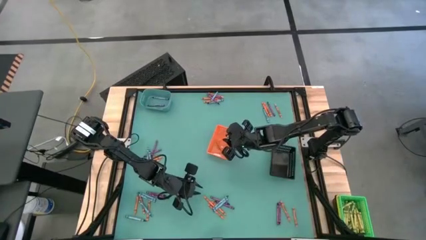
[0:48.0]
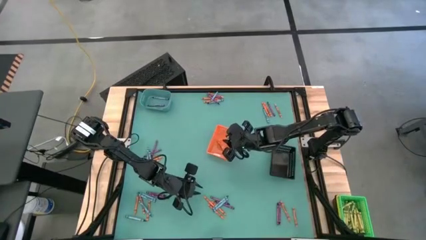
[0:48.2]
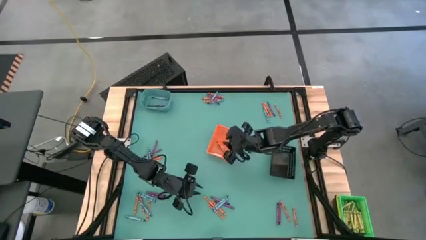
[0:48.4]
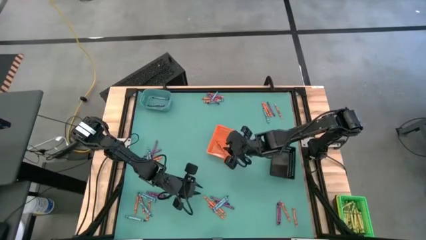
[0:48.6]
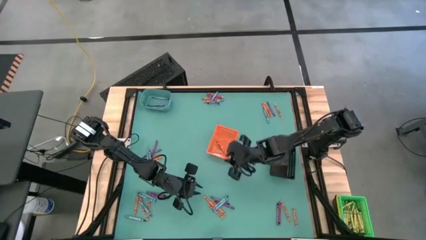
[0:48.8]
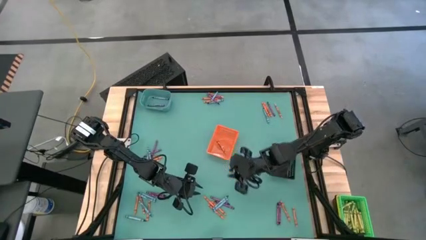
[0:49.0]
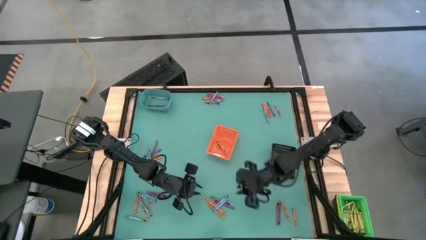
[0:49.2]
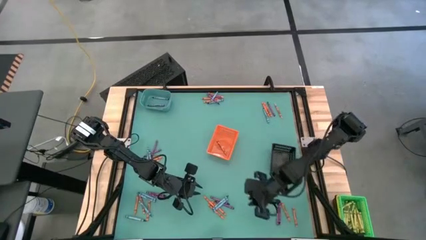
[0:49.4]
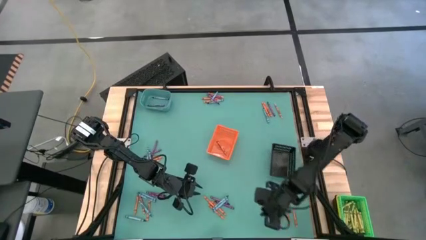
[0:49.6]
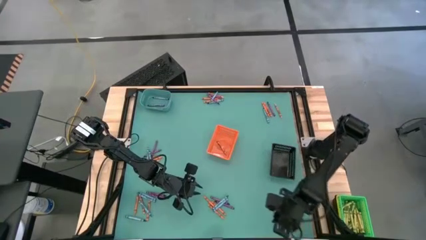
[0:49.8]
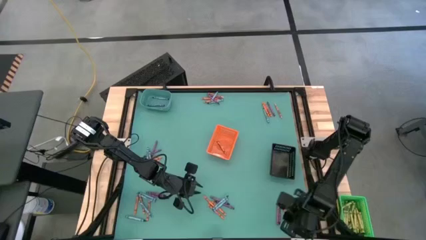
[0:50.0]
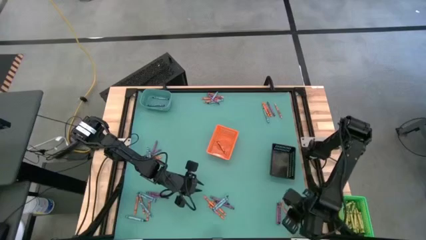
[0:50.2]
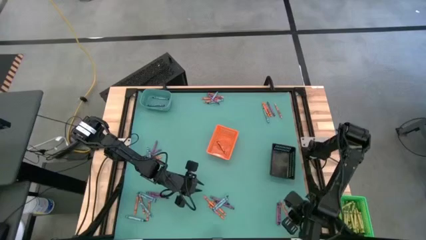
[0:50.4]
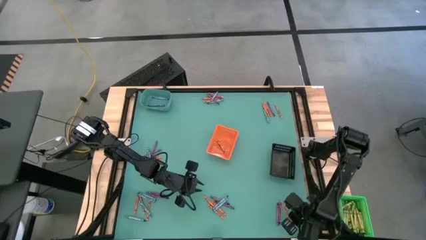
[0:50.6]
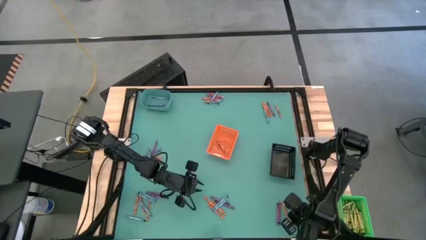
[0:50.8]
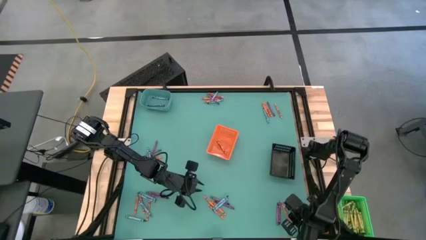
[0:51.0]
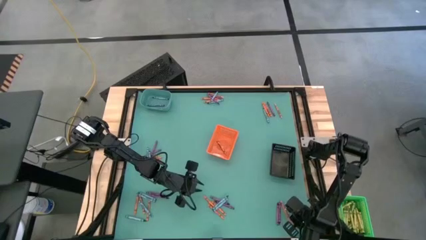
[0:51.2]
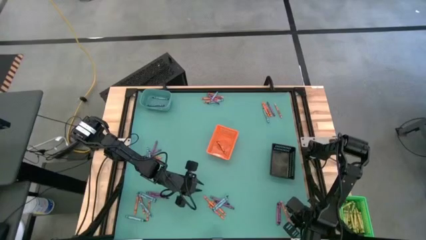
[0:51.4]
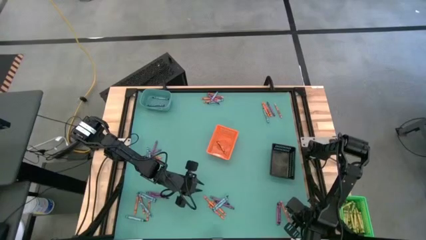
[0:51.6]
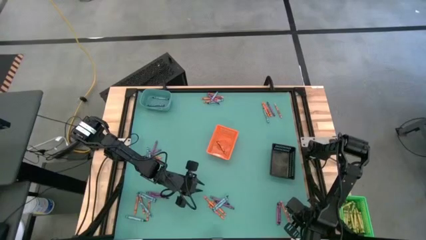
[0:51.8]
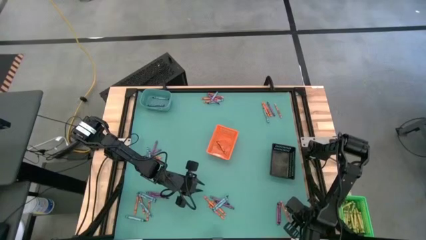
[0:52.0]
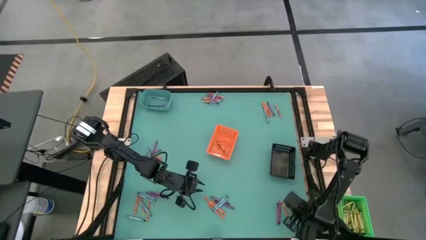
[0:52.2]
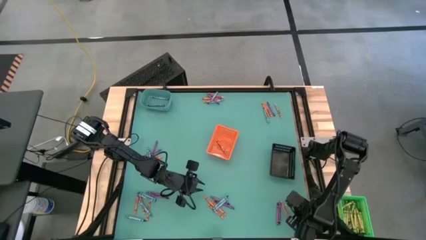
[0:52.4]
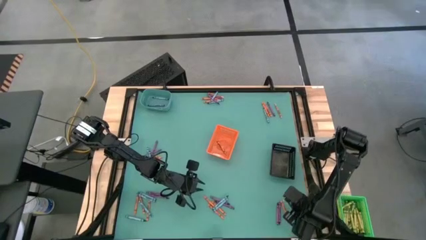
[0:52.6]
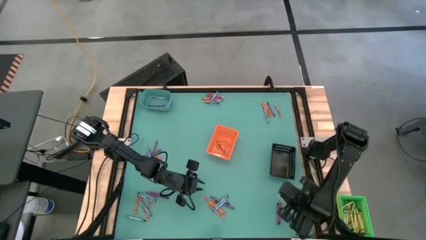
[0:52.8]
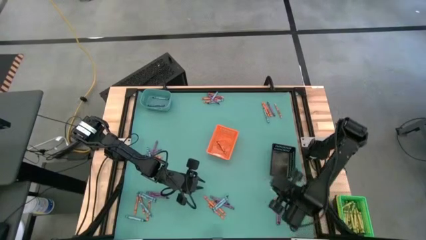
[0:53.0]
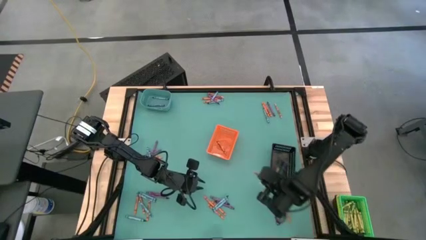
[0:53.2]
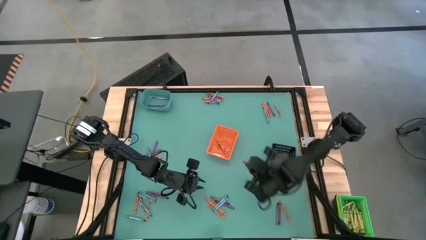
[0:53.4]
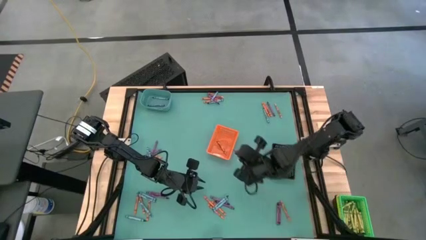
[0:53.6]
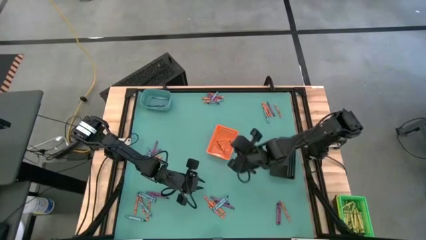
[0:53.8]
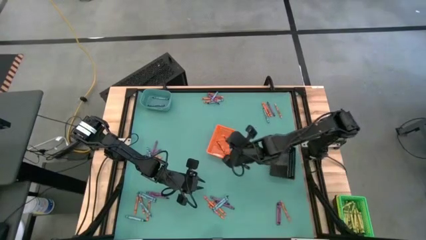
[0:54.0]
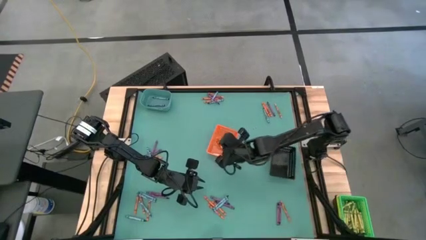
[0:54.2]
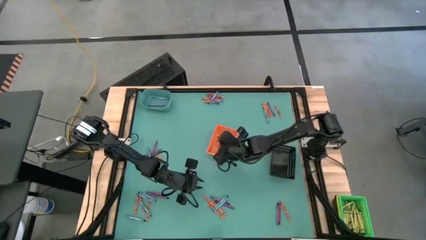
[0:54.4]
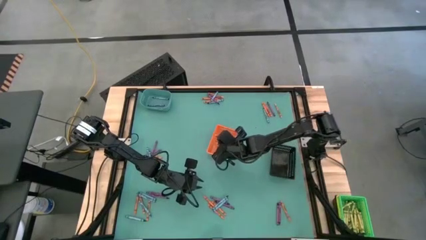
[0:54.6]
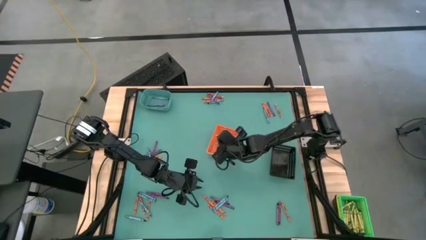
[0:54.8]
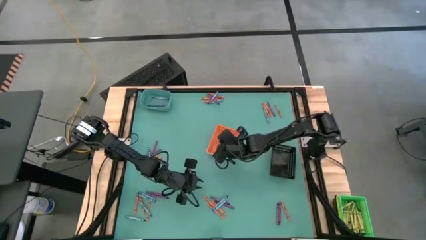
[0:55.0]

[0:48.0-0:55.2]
Task: Sort crayons
Put the orange crayon into the orange bin

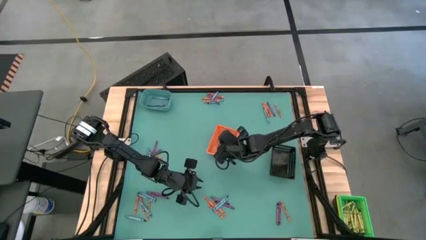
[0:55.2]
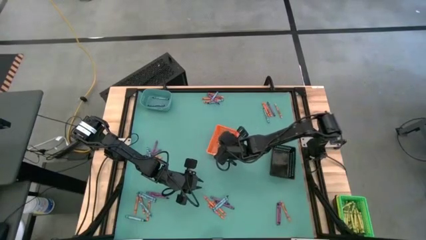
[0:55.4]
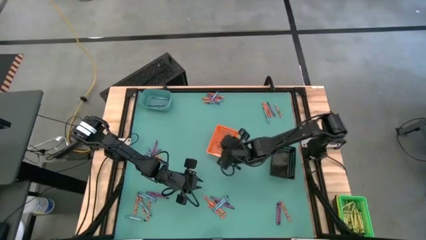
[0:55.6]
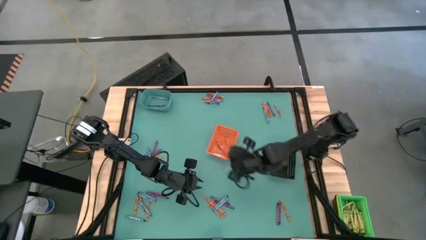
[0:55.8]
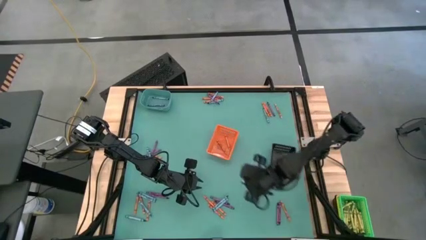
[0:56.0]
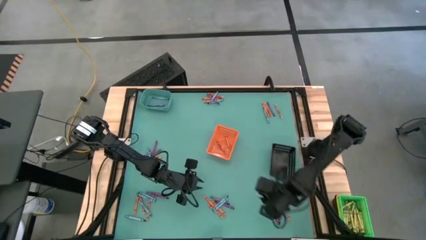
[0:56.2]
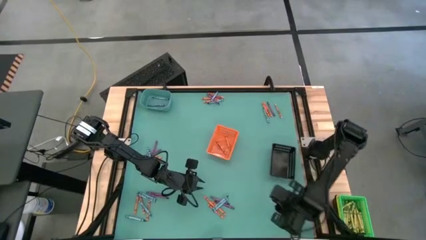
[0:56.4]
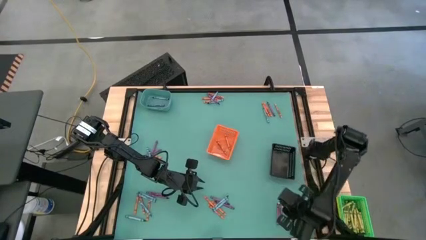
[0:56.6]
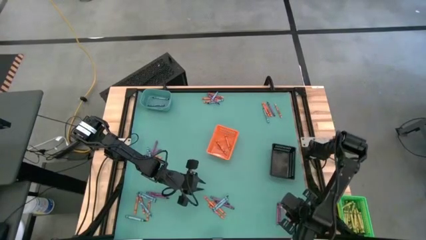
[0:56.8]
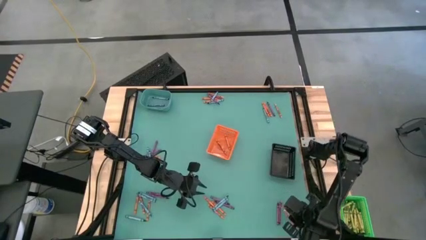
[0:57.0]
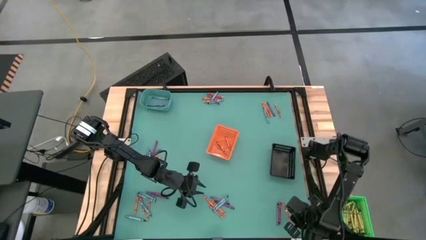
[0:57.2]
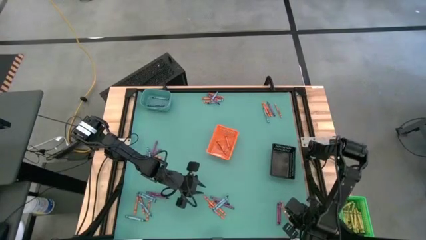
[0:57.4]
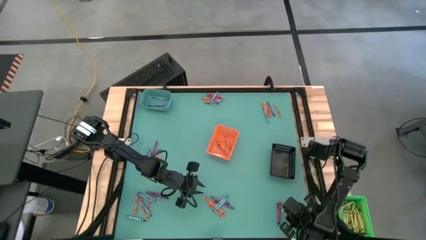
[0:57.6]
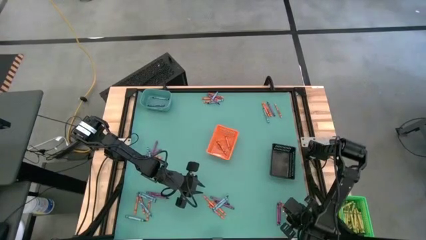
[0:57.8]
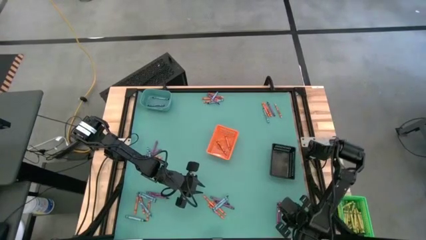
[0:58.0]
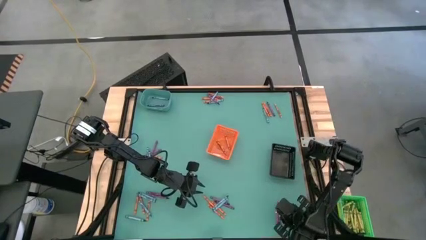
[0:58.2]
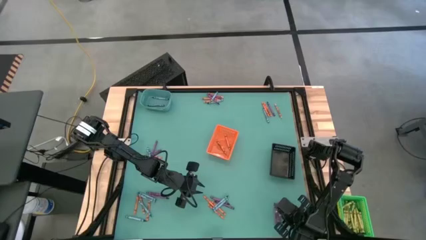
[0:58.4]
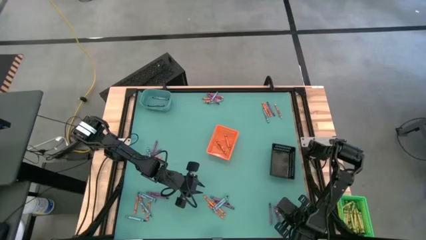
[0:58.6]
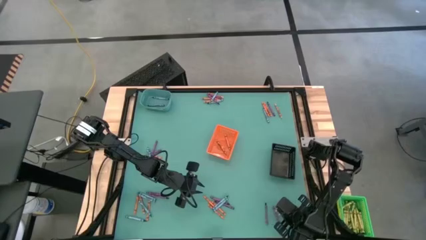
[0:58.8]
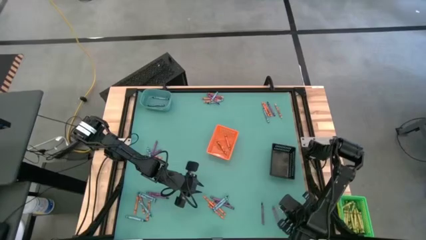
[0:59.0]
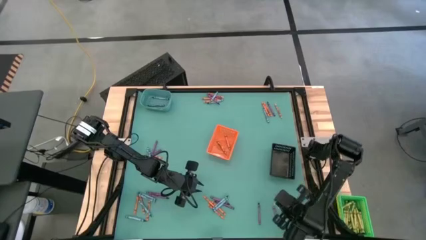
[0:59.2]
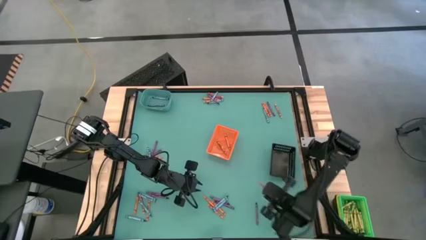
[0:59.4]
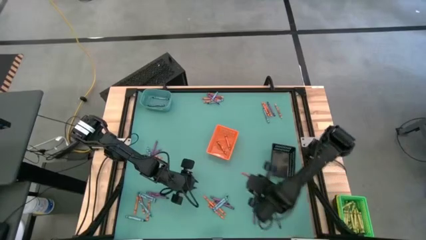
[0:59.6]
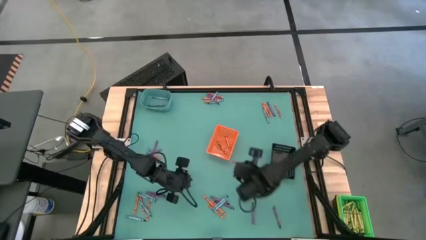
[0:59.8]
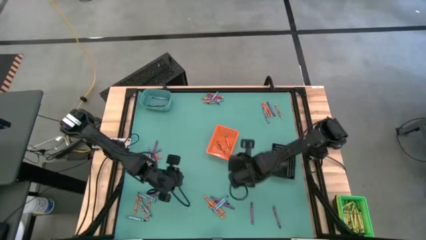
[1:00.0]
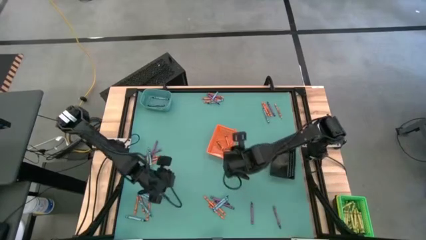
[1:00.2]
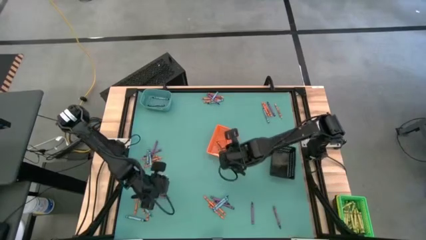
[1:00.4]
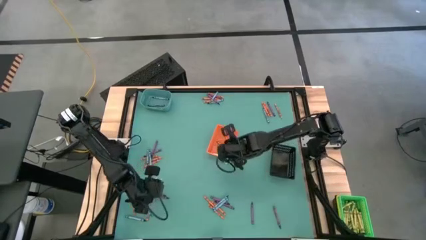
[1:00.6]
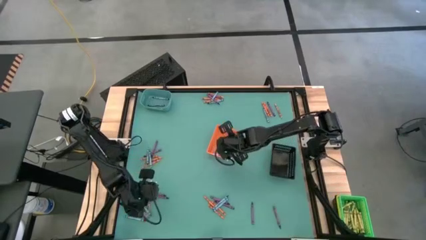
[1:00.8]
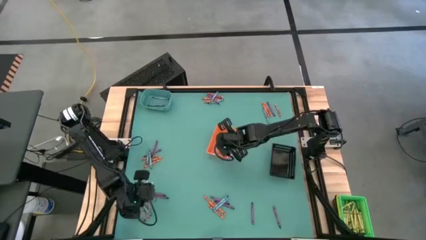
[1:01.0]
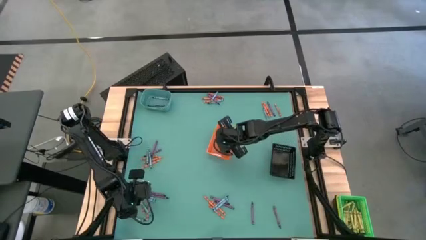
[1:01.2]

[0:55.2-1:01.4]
Put the orange crayon into the orange bin

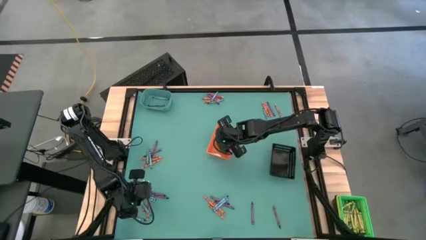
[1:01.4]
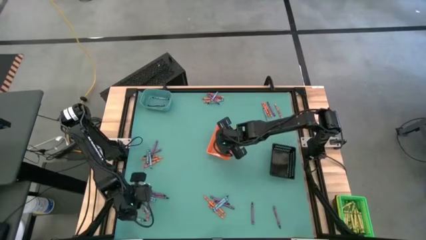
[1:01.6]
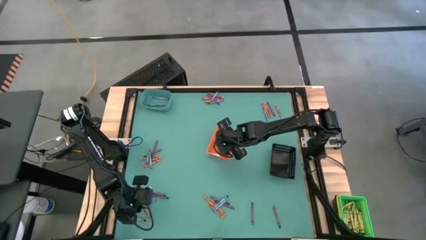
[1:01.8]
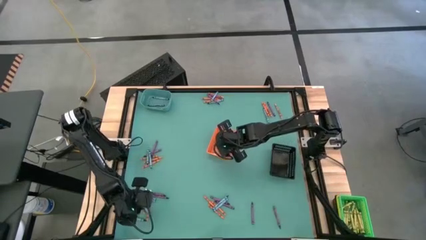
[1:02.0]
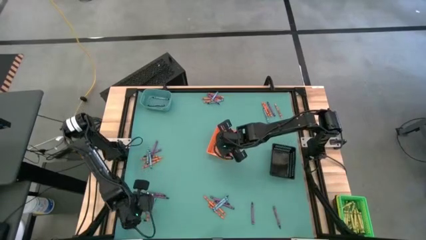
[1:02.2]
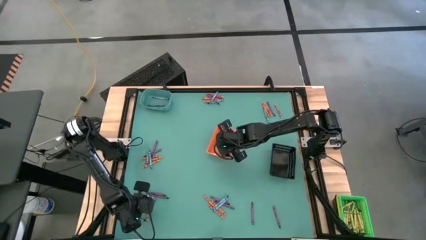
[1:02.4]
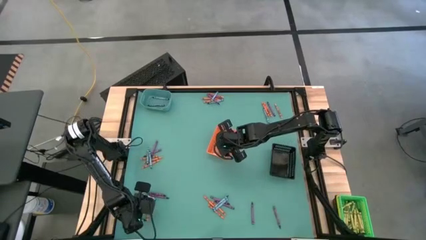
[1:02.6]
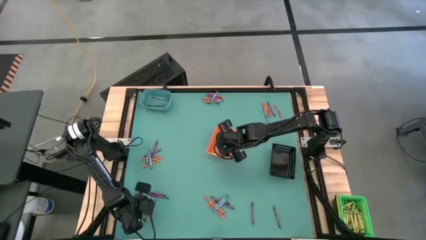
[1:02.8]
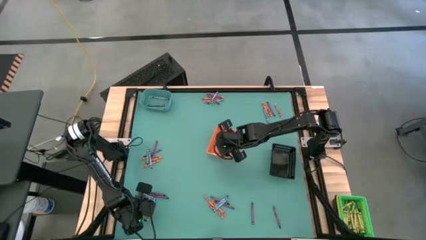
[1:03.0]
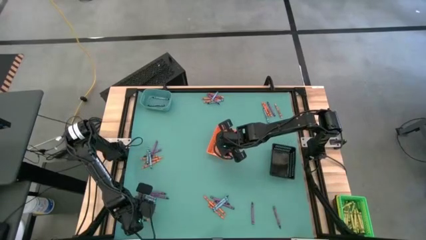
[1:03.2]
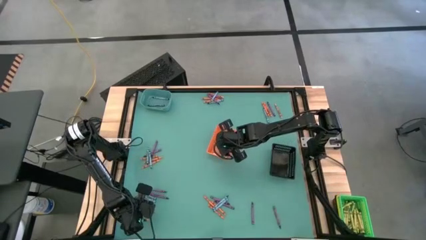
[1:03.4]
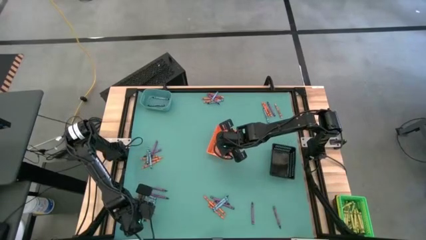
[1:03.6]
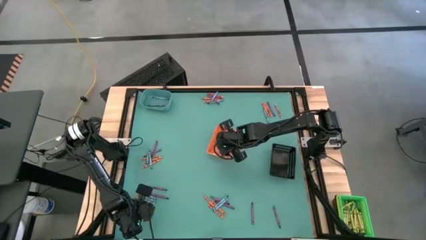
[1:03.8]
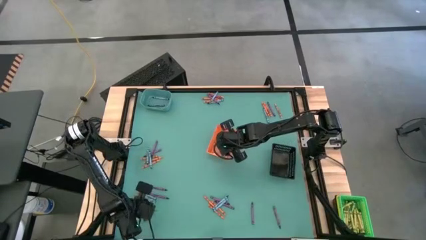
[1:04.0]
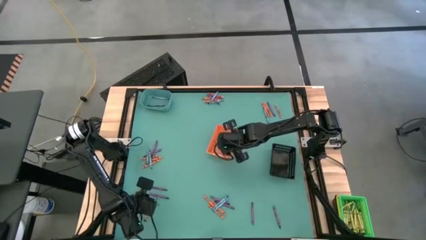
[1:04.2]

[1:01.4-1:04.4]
Put the blue crayon into the blue bin
